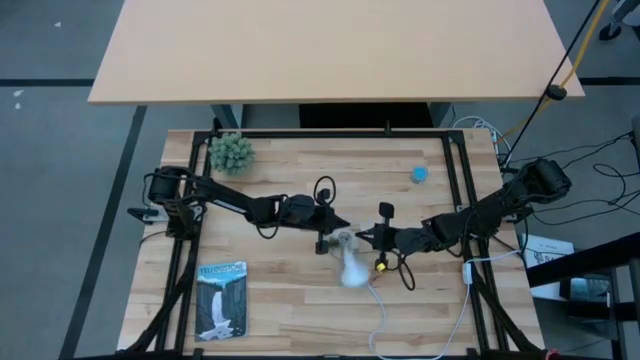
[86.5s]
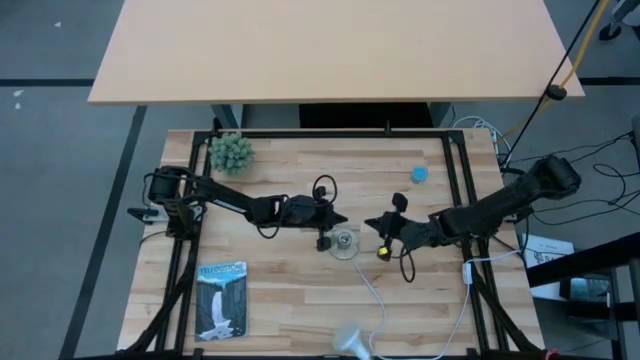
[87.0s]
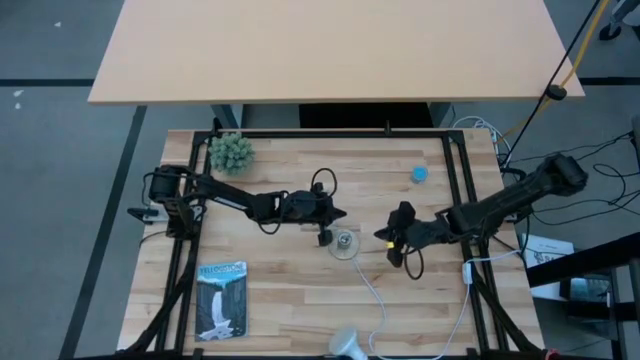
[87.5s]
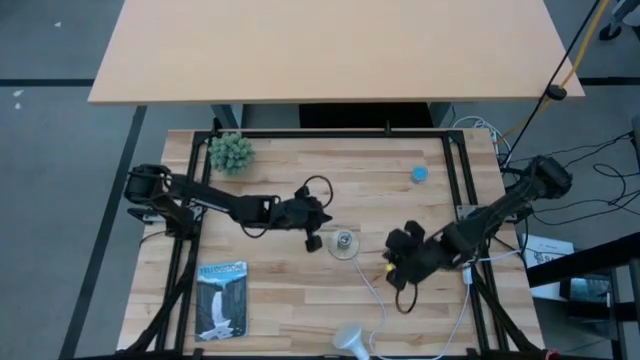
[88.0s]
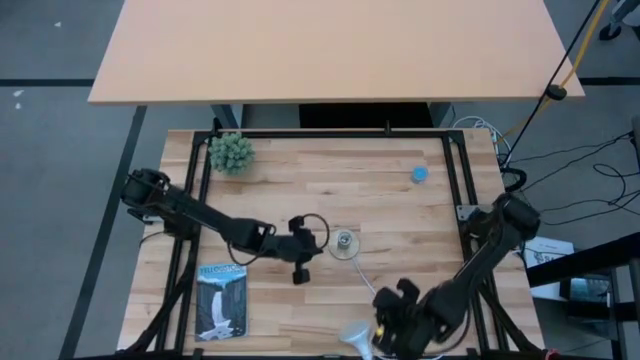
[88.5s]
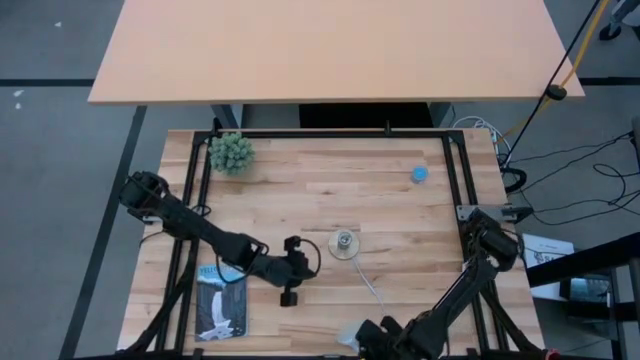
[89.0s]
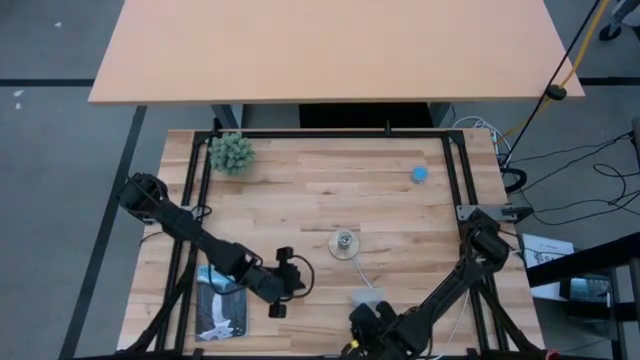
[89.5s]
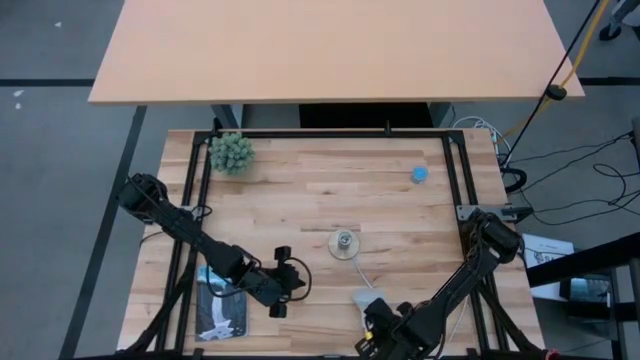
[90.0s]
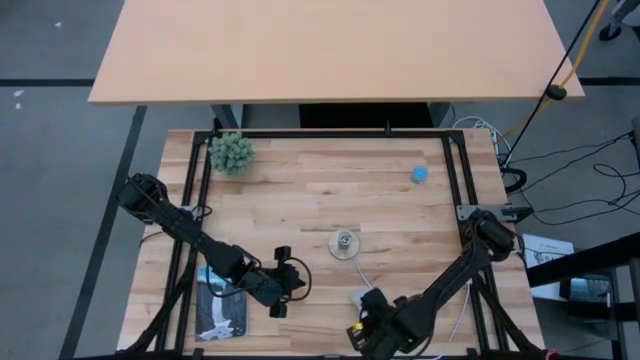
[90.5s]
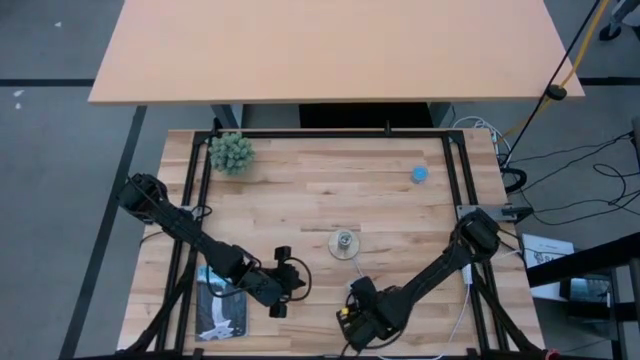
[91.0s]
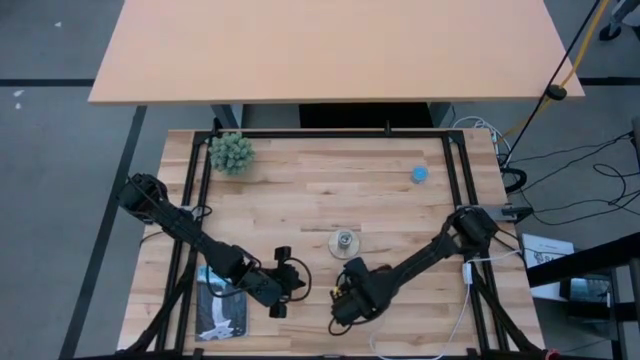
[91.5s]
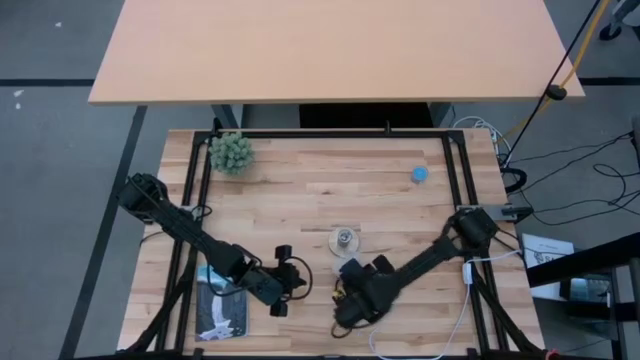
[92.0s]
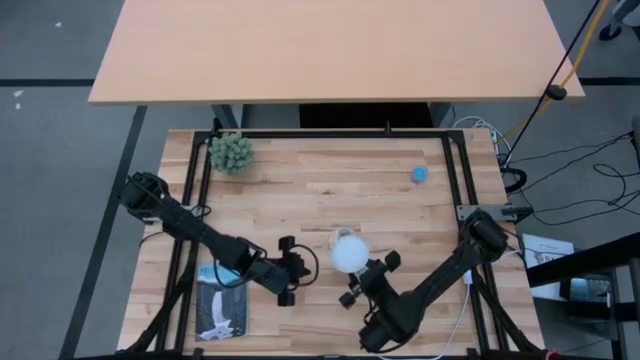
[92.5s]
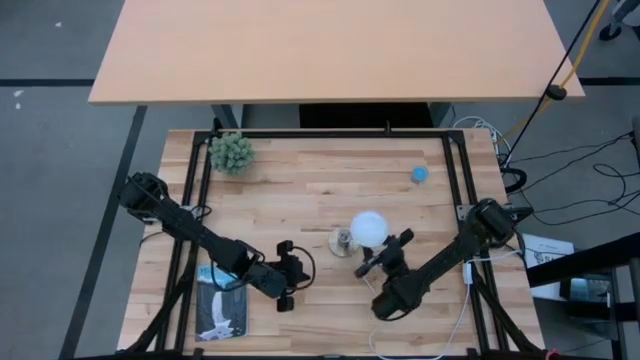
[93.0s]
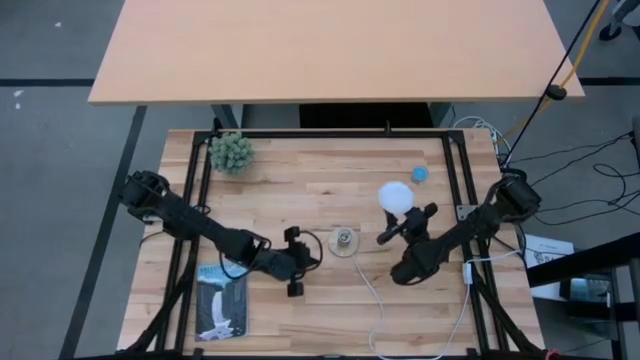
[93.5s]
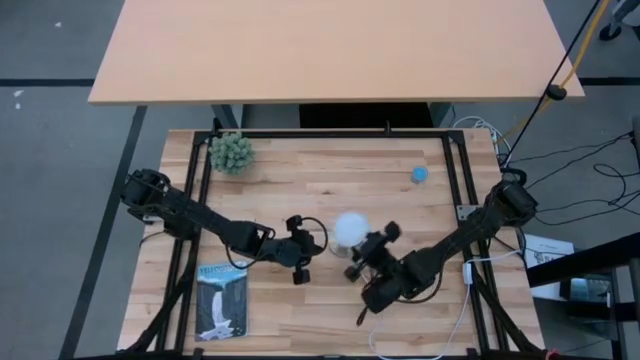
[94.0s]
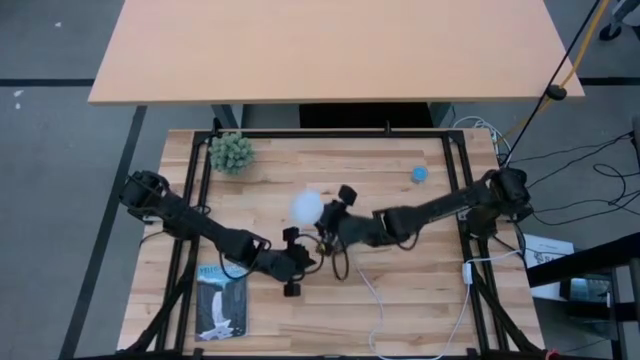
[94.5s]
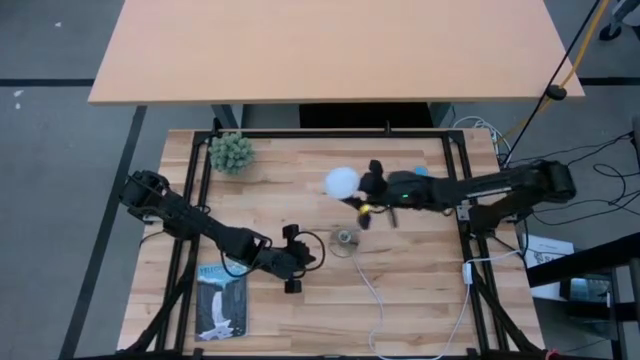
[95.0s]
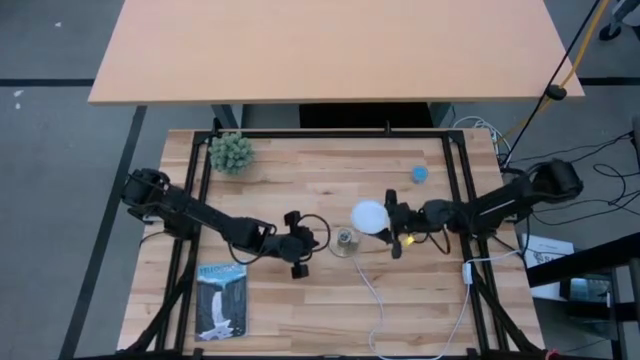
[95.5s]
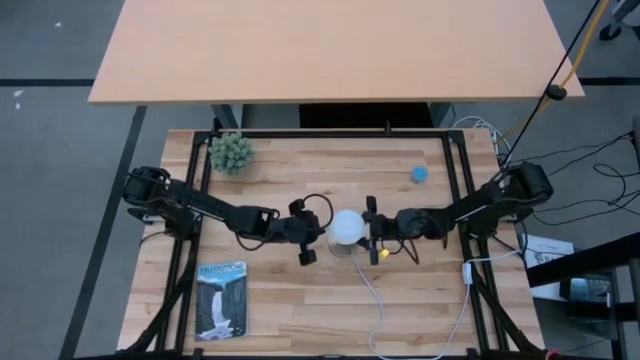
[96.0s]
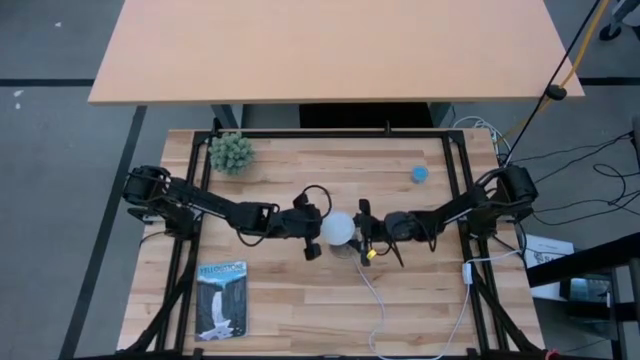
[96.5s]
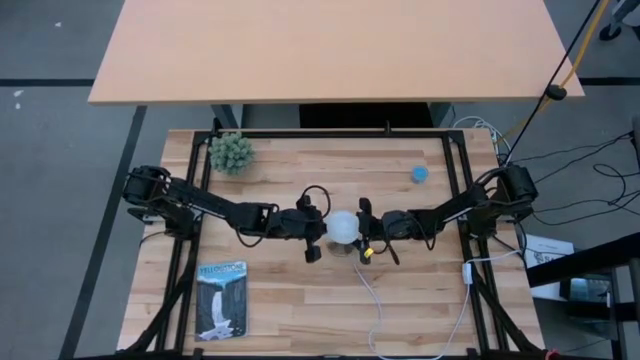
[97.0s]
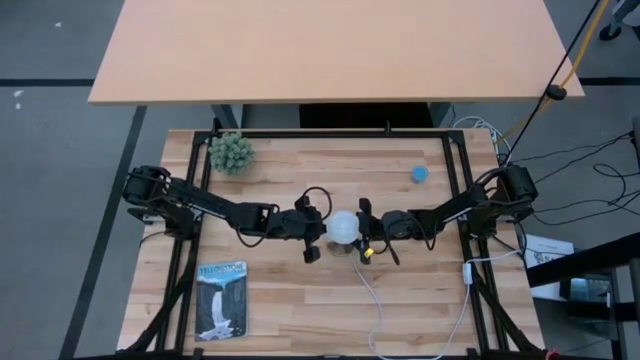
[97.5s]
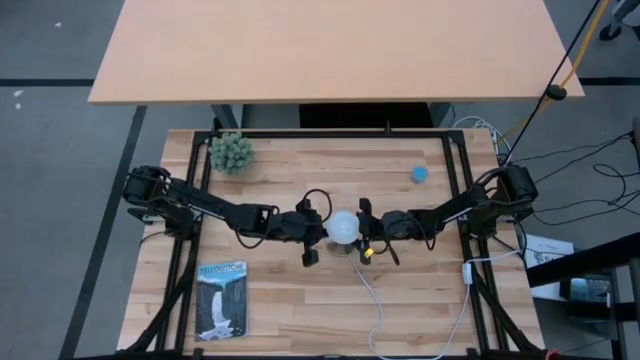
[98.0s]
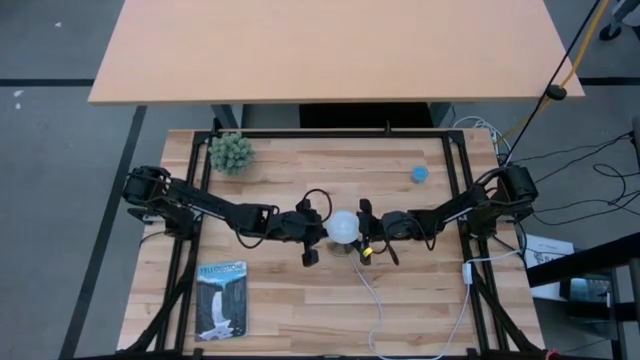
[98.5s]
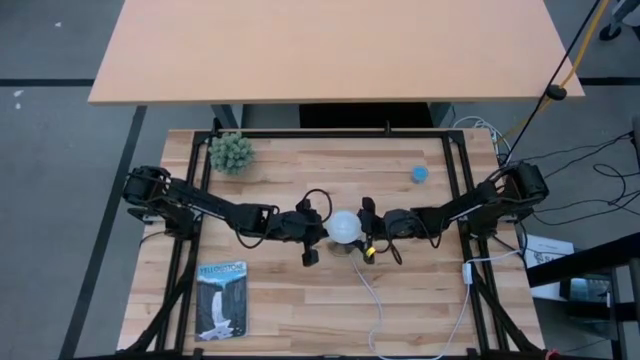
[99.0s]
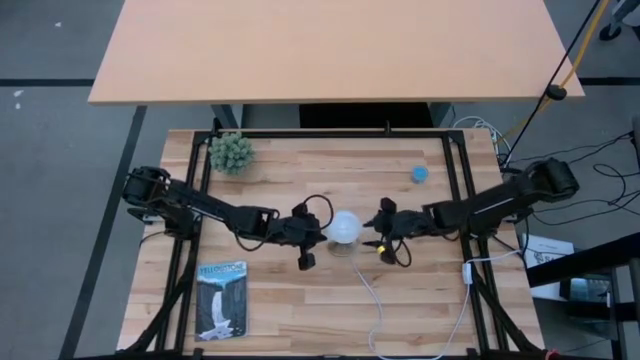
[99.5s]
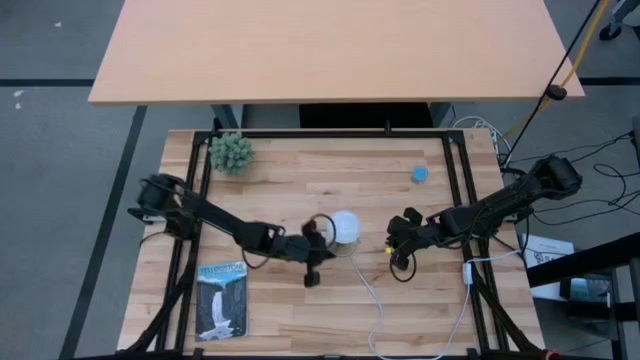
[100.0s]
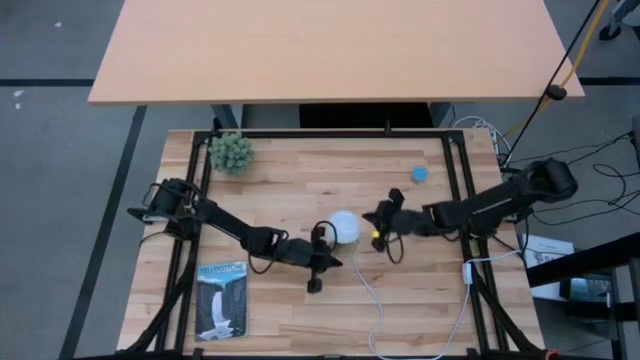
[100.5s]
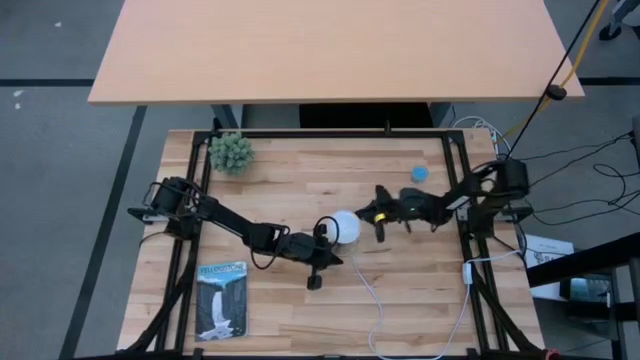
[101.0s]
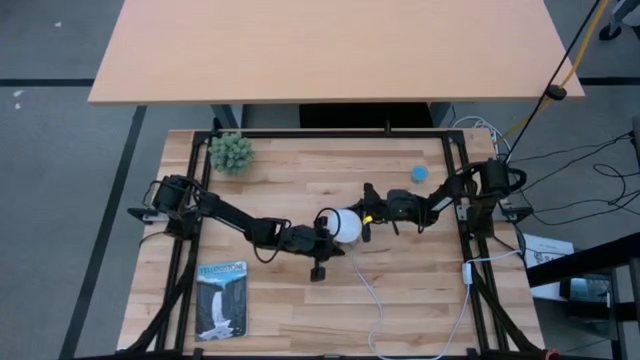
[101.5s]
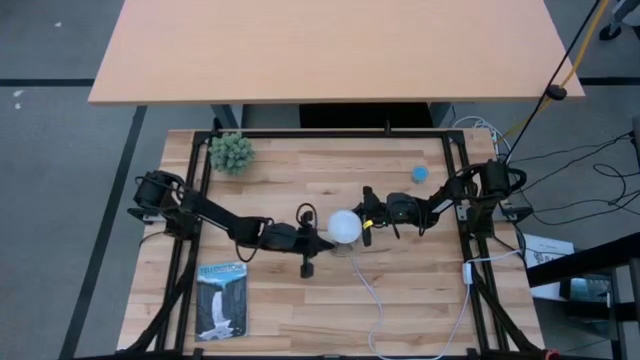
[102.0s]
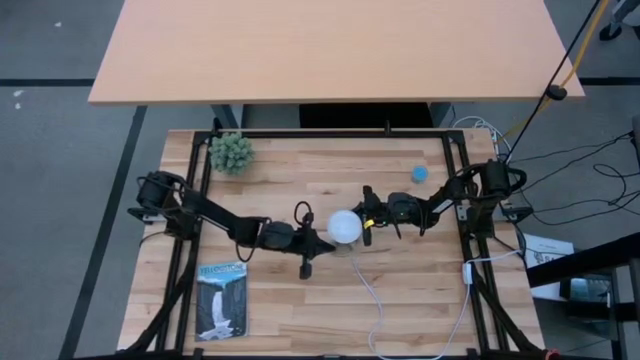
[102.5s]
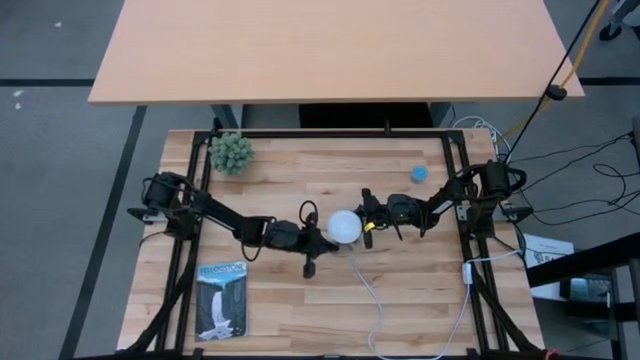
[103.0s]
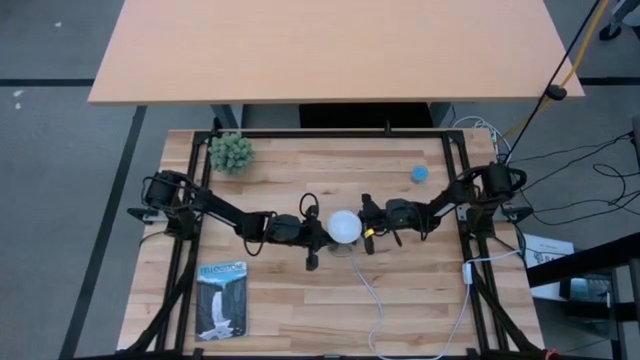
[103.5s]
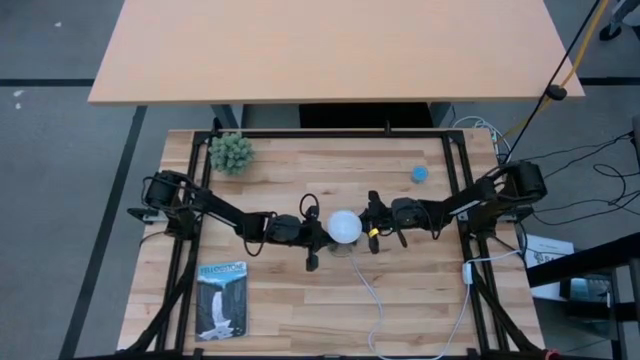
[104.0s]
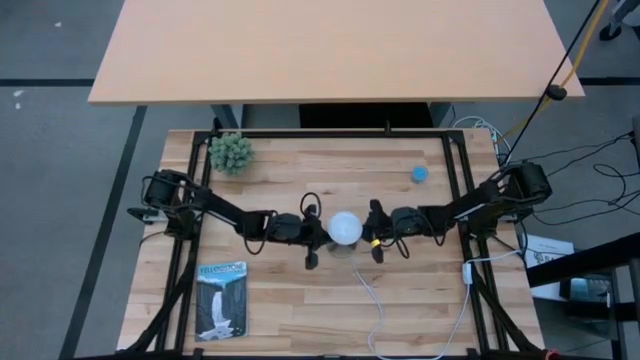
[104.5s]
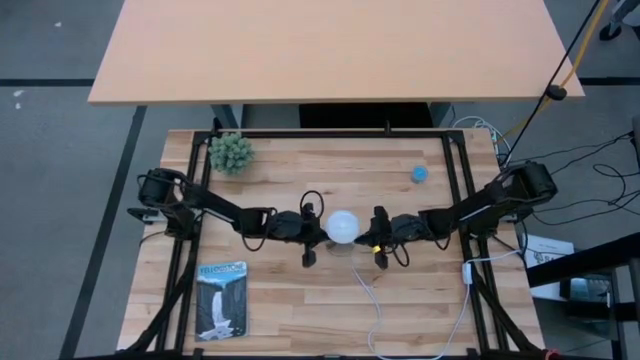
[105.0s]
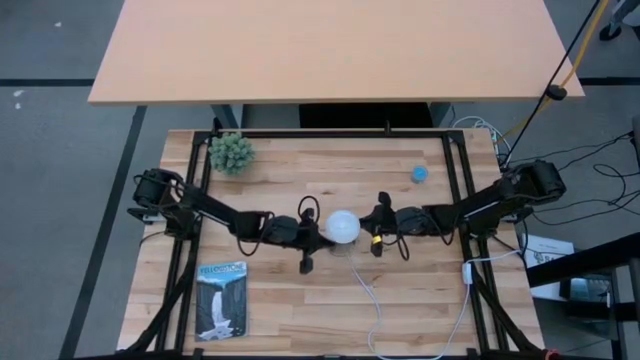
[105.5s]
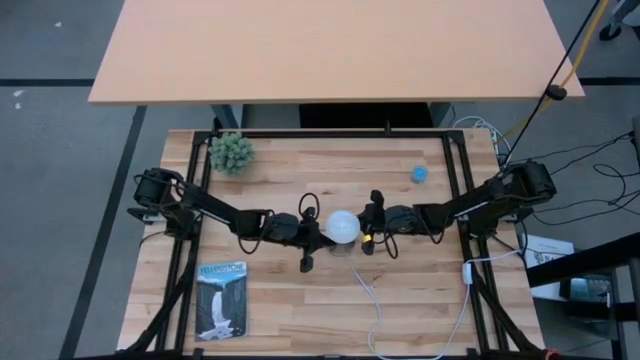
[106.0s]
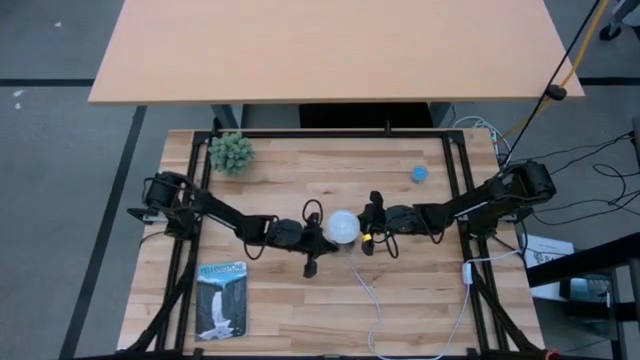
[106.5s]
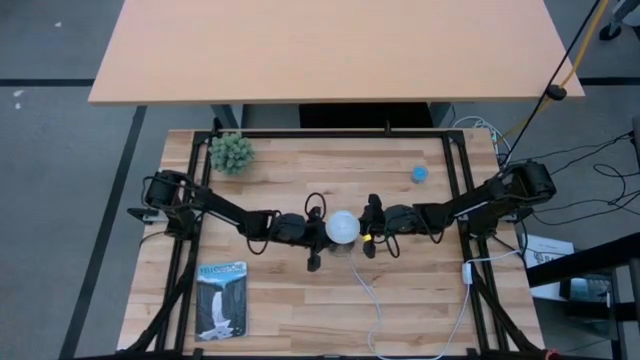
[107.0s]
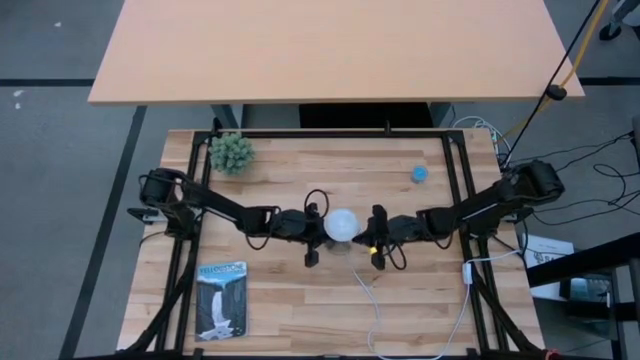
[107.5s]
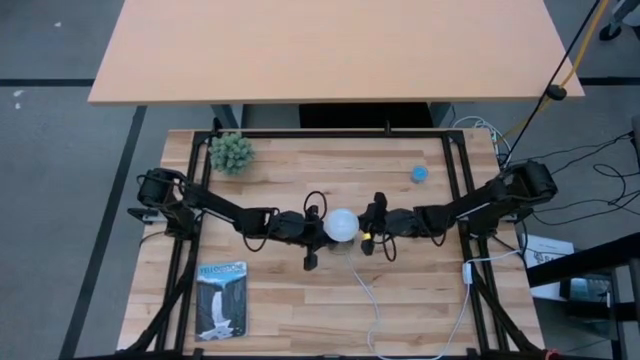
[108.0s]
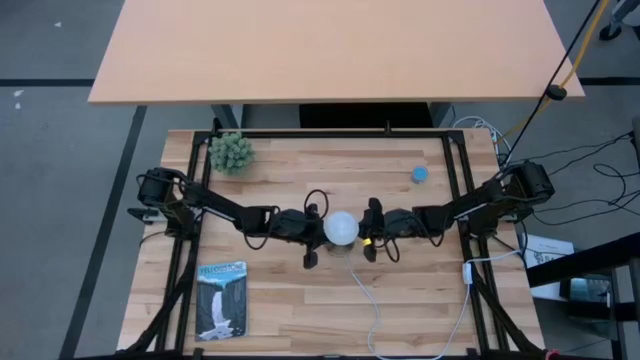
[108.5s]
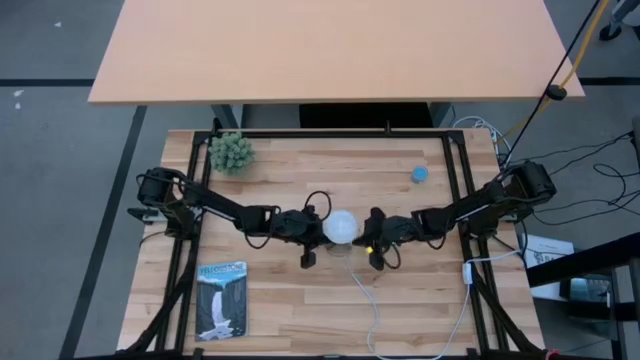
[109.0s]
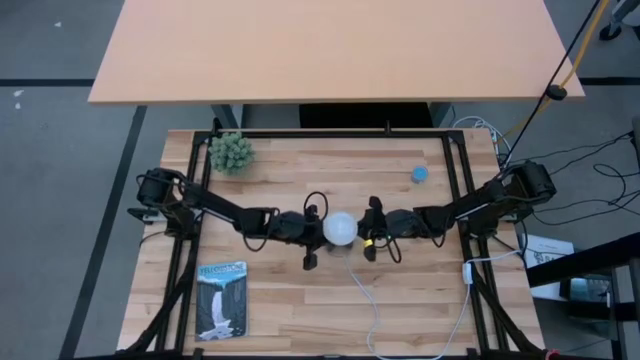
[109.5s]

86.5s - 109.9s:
Task: Screw lightbulb
Insert the lightbulb into the lamp
